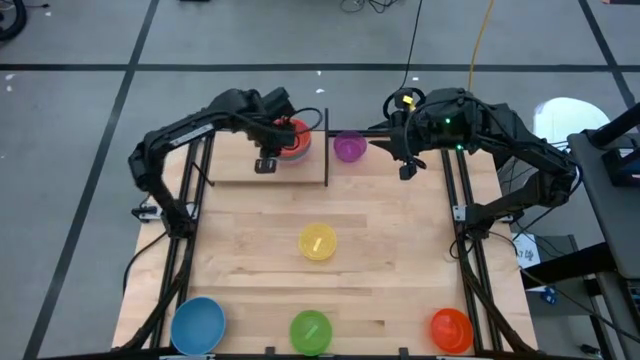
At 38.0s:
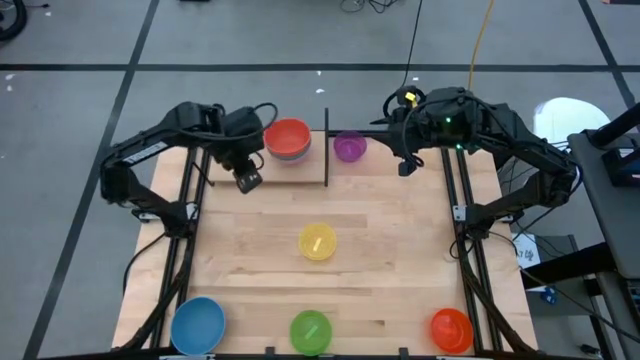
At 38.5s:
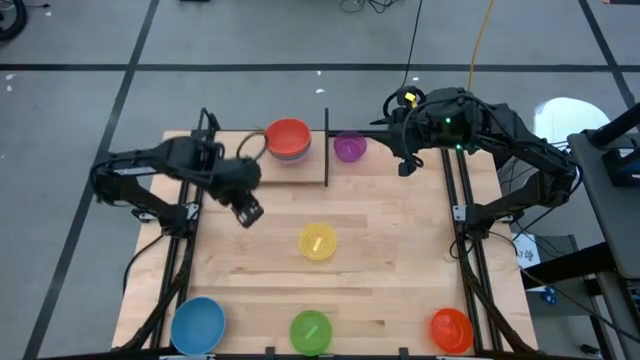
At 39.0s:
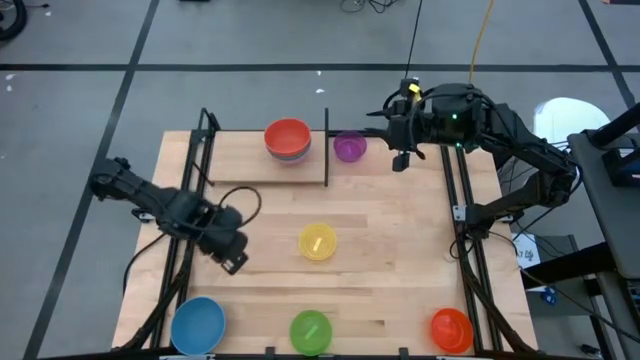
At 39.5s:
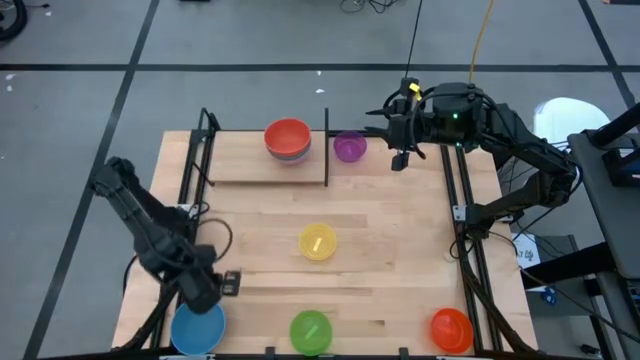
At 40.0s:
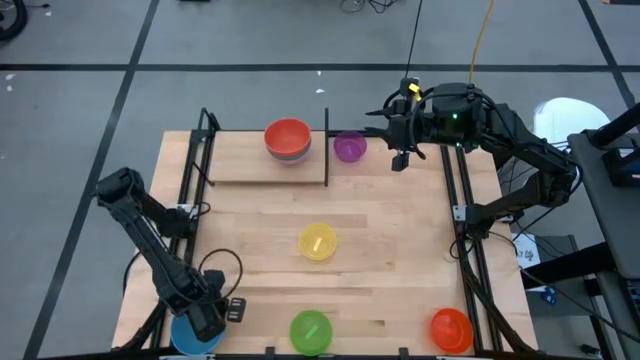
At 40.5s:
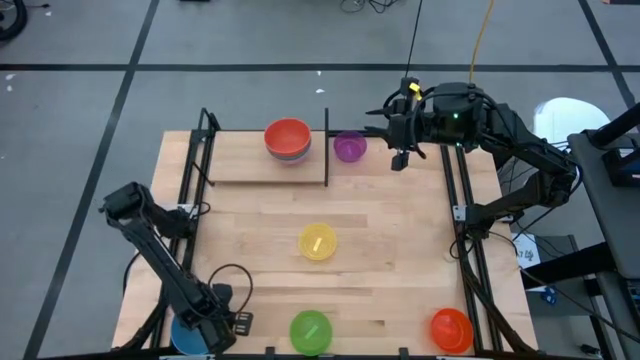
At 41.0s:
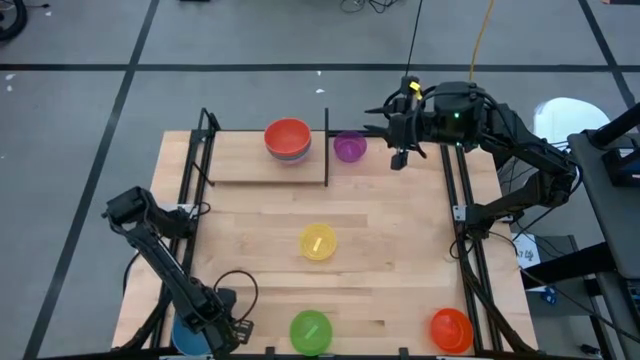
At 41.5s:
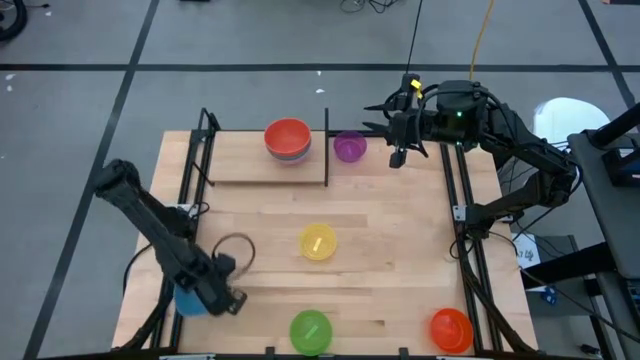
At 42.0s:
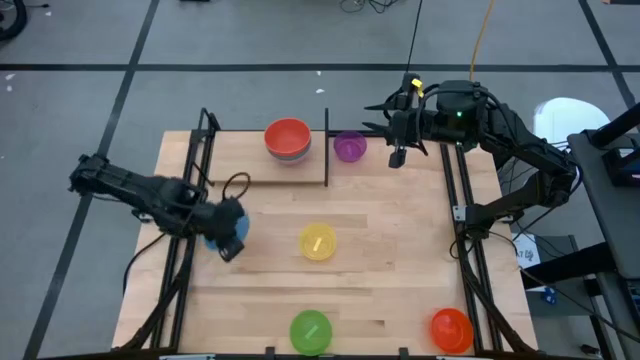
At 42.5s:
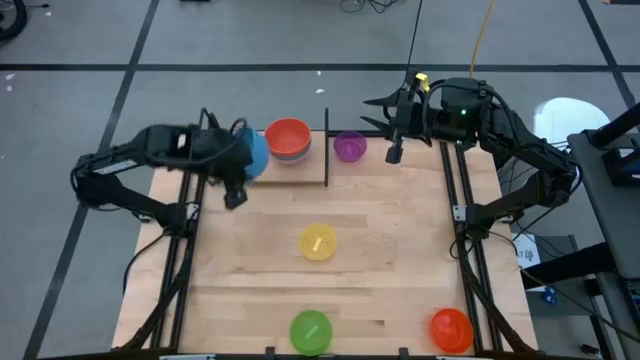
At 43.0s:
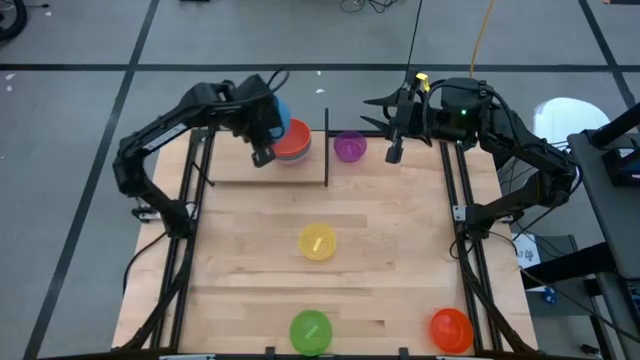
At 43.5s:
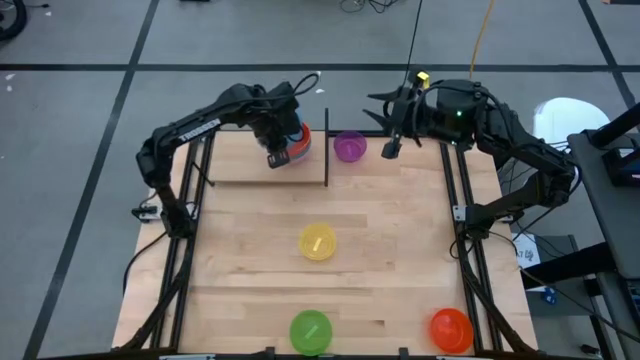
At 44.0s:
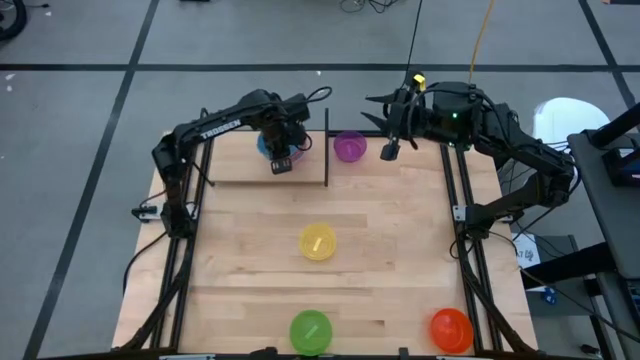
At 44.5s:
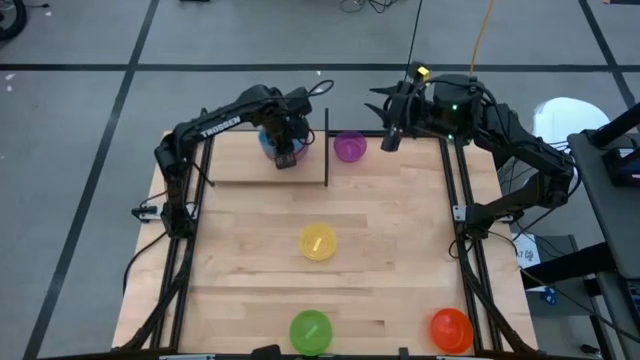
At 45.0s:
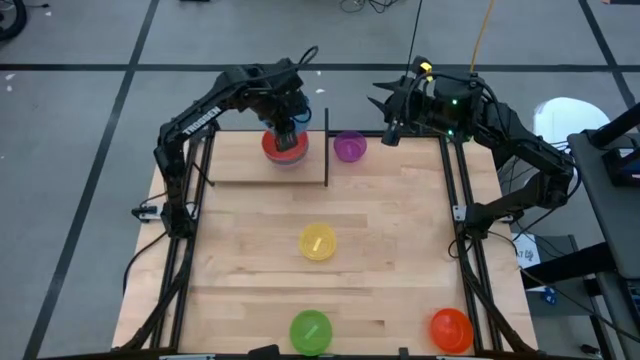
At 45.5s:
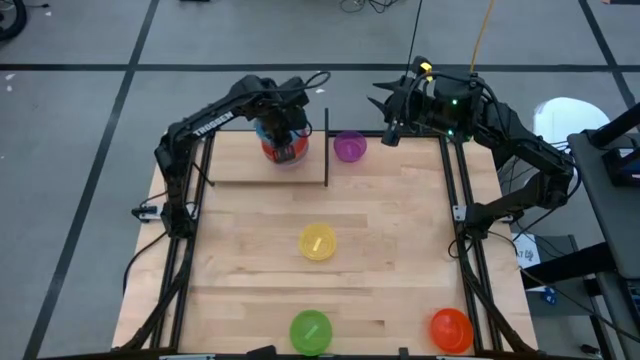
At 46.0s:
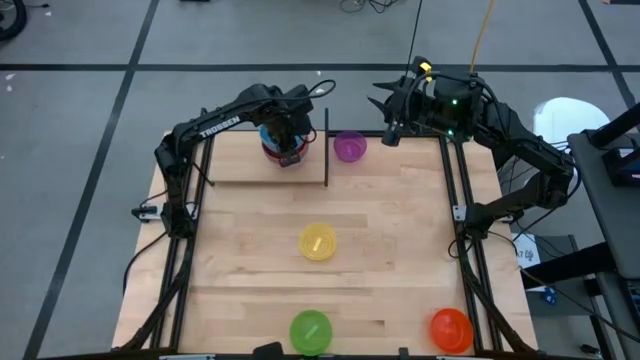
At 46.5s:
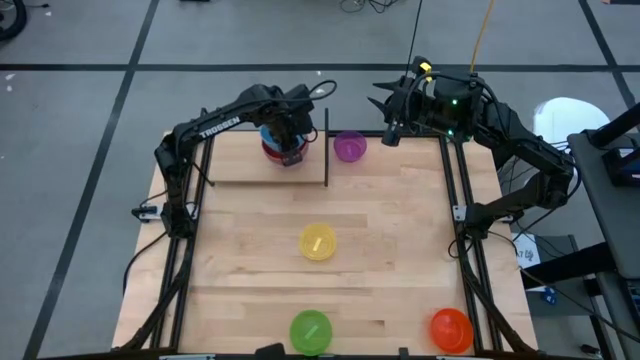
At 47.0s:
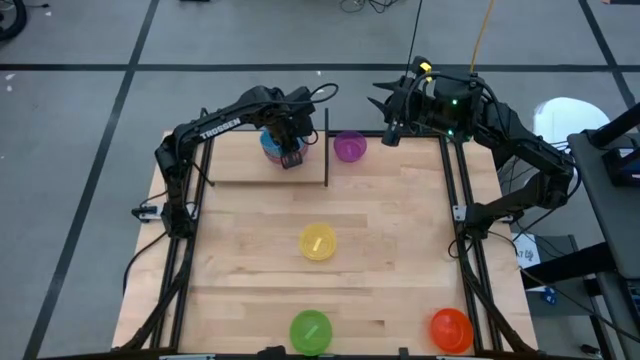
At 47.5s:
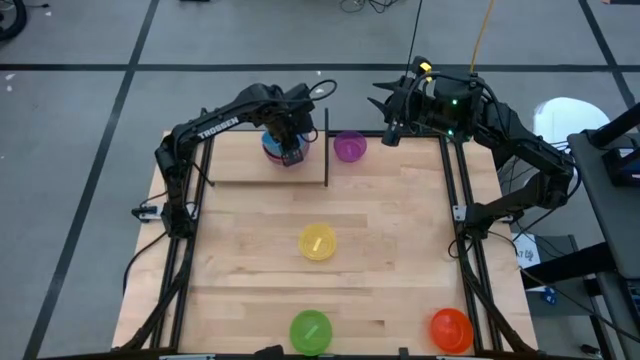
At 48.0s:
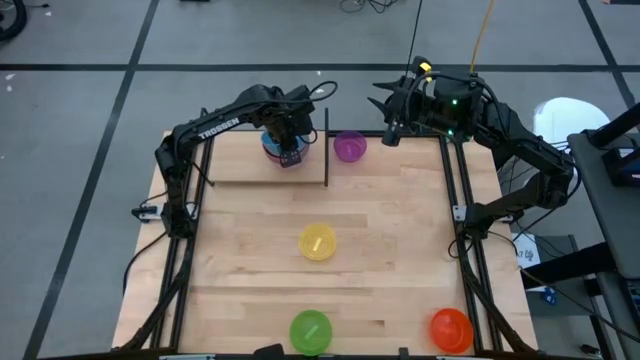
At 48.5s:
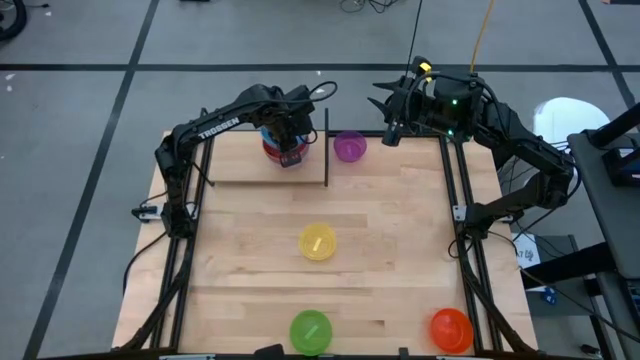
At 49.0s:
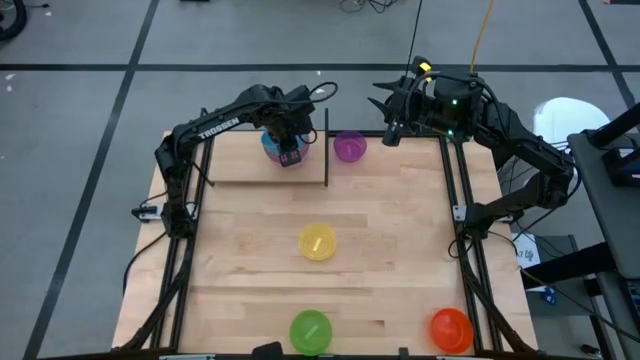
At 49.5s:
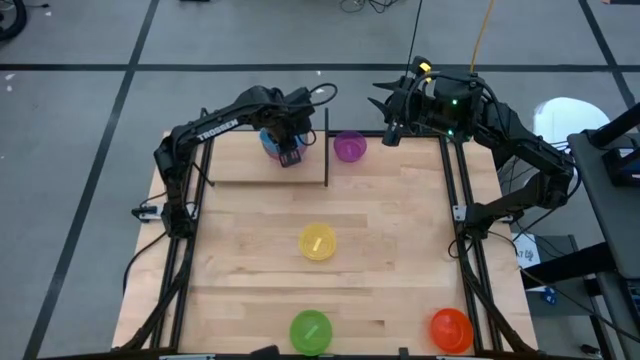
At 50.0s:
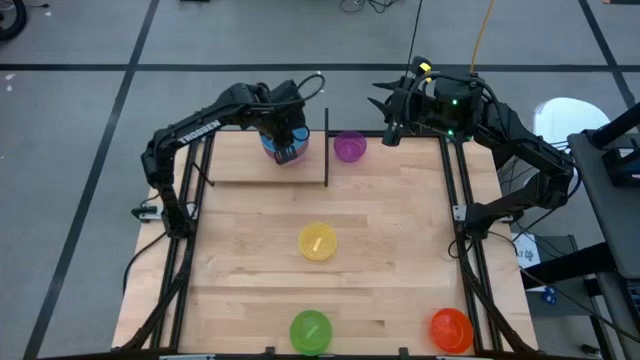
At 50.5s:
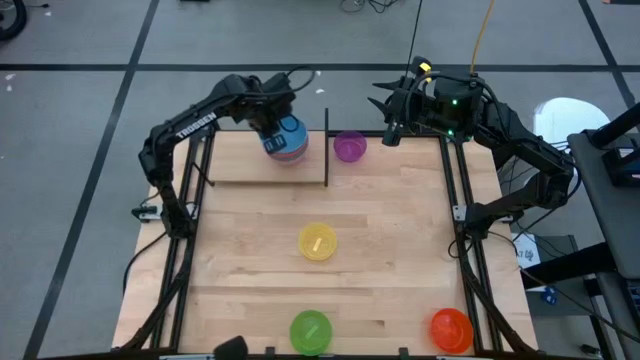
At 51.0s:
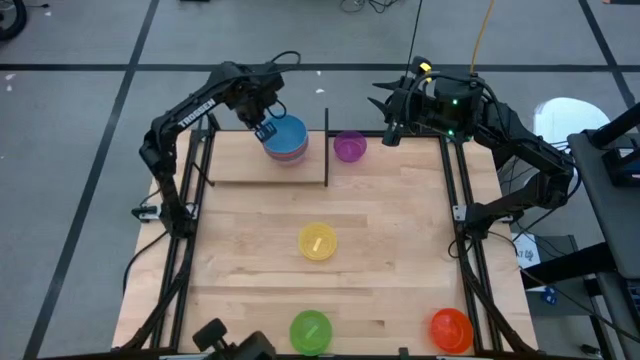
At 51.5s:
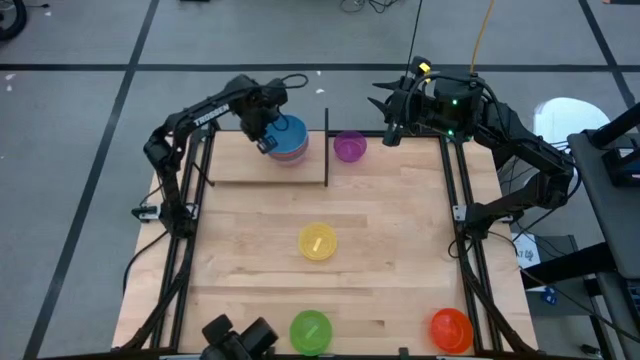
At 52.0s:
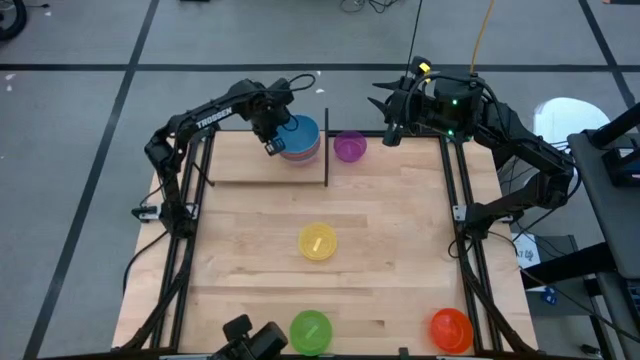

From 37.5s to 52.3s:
Task: Place and stack bowls onto a shelf
Stack the big blue bowl into the orange bowl on the shelf
